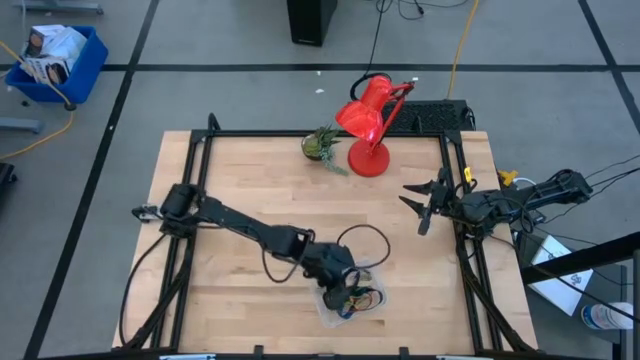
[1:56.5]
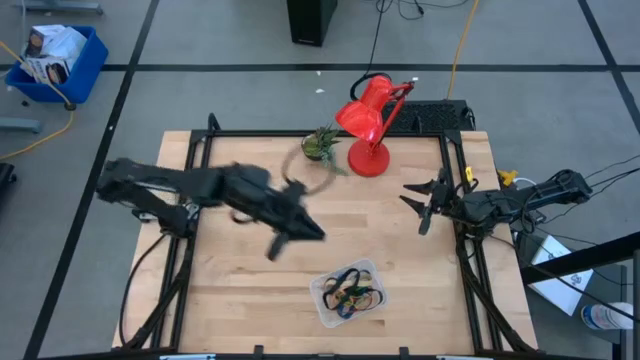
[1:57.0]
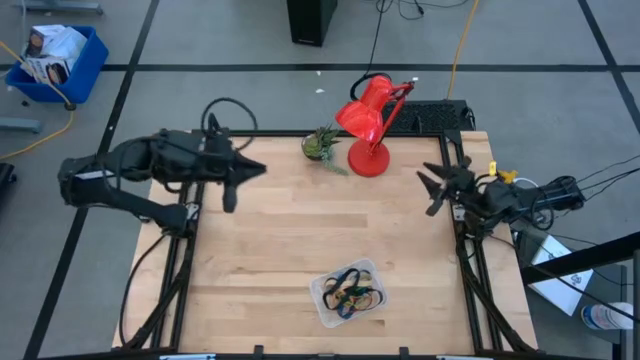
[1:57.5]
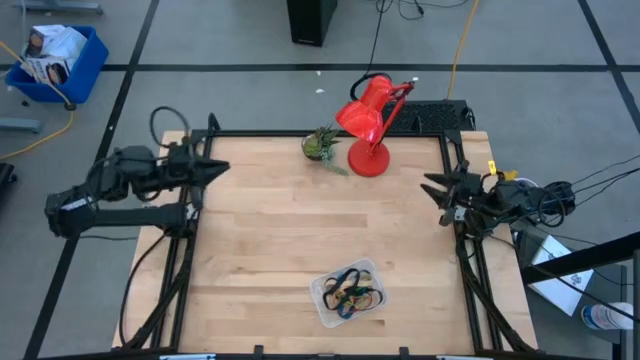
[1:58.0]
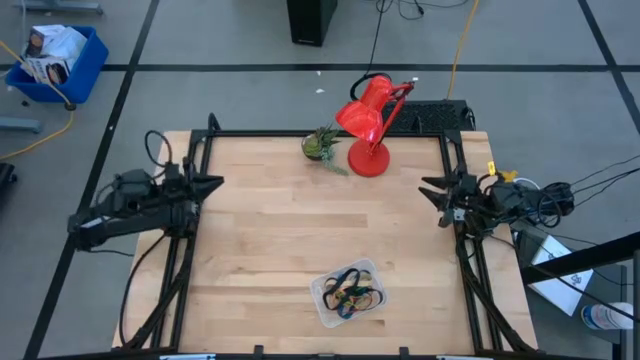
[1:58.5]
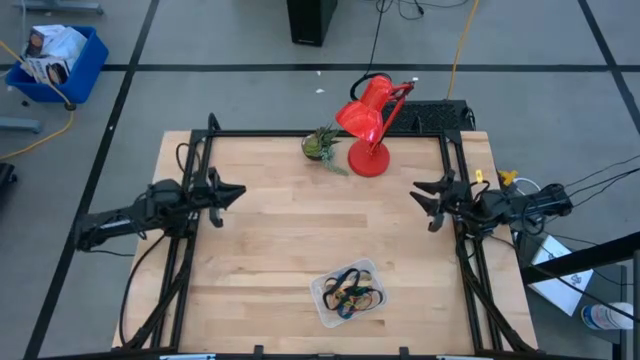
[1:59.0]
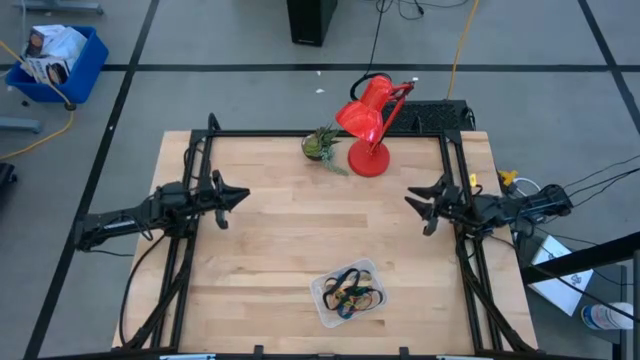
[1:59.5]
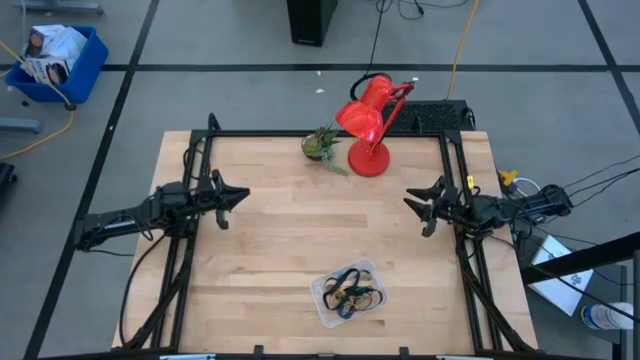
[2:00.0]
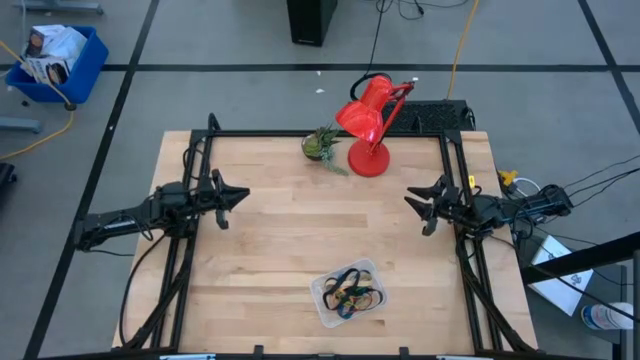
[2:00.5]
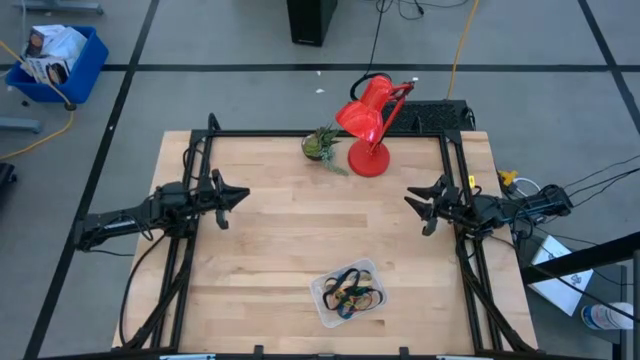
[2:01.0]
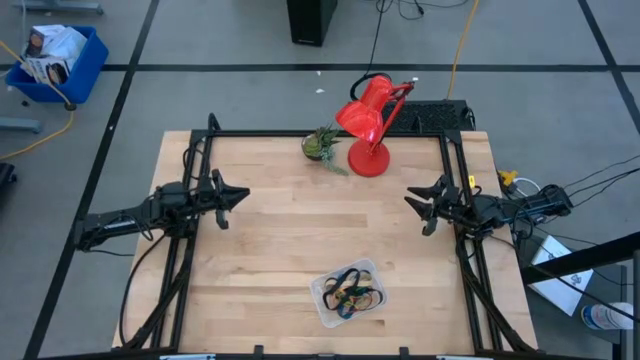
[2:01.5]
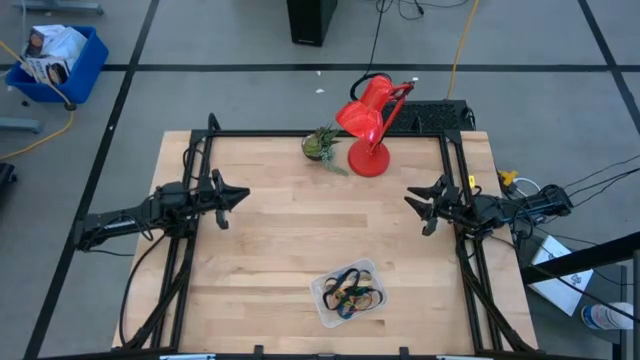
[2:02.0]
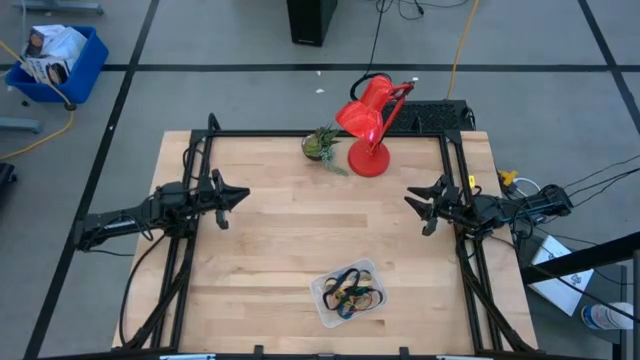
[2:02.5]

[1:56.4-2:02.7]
Task: Pick and place rubber bands into bin
Return to Home Position

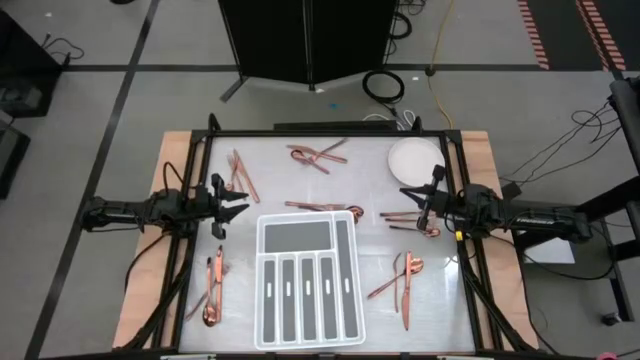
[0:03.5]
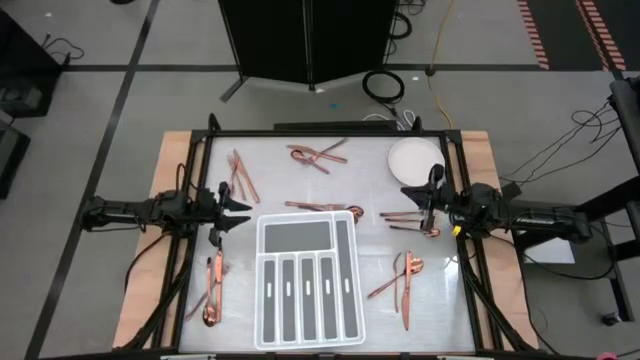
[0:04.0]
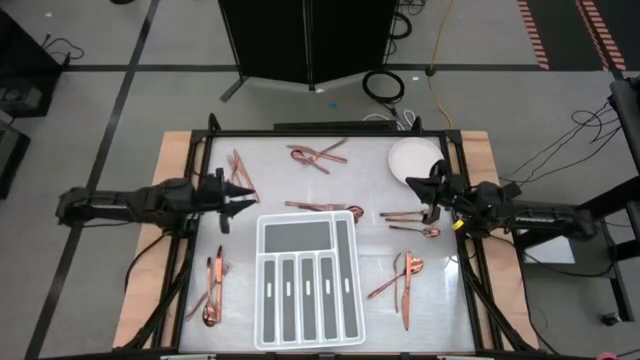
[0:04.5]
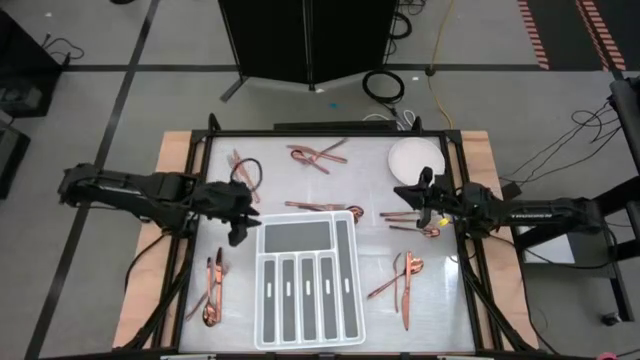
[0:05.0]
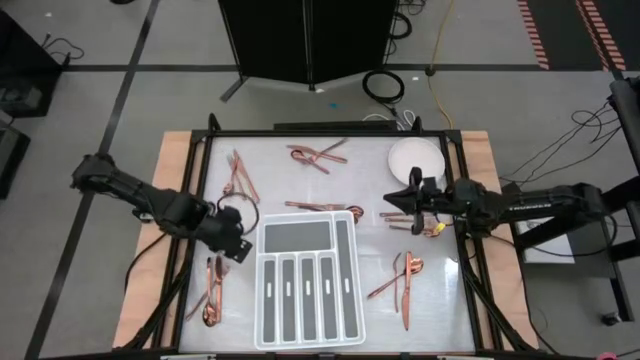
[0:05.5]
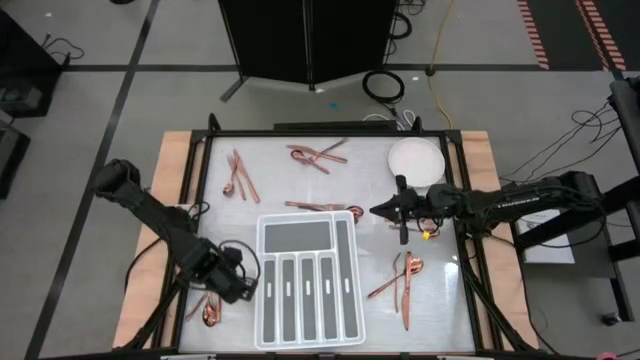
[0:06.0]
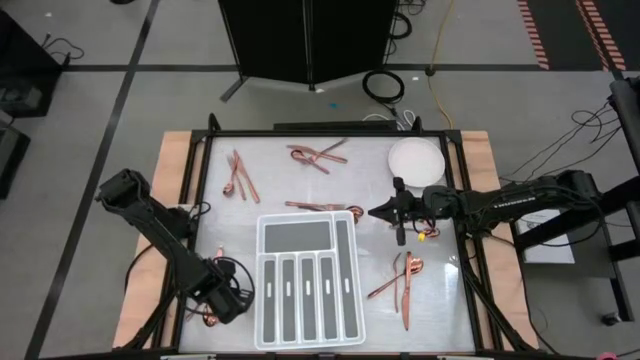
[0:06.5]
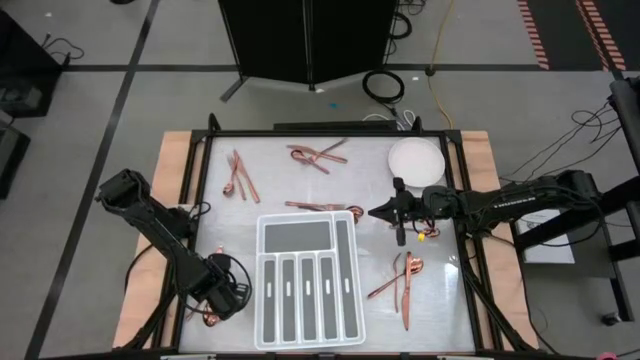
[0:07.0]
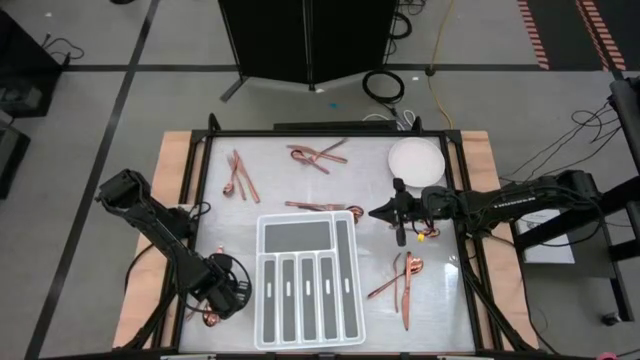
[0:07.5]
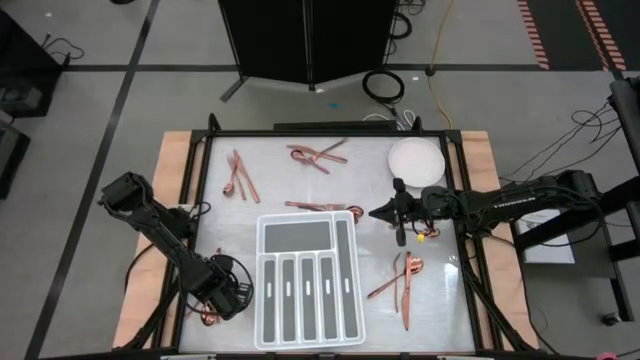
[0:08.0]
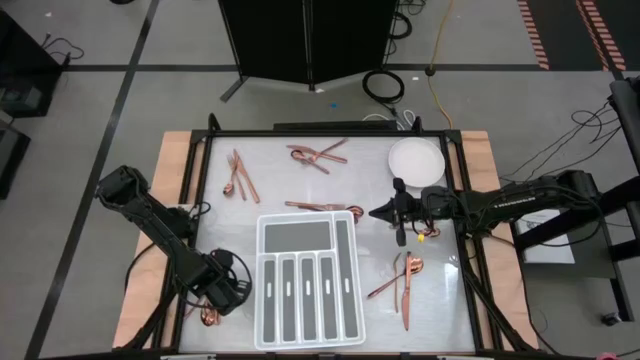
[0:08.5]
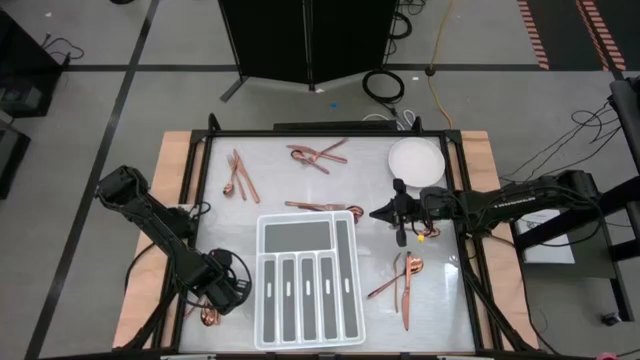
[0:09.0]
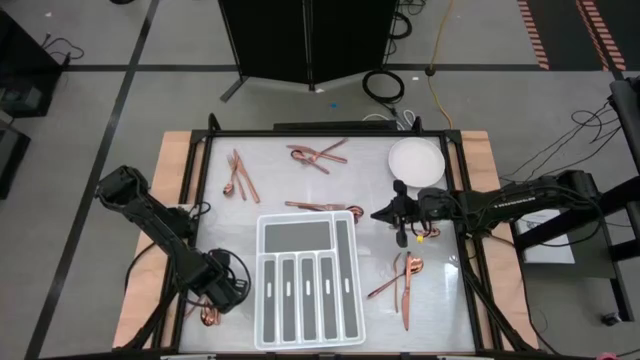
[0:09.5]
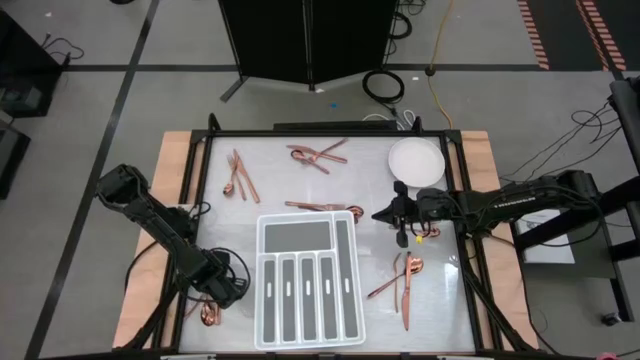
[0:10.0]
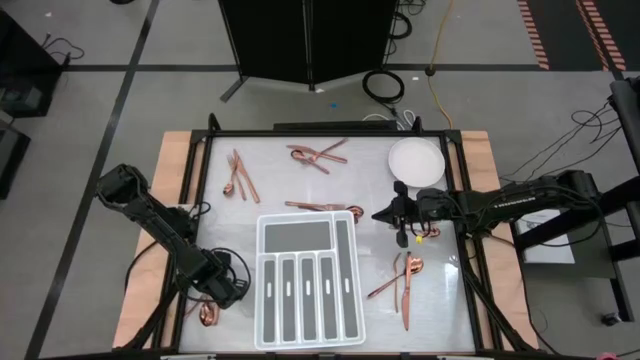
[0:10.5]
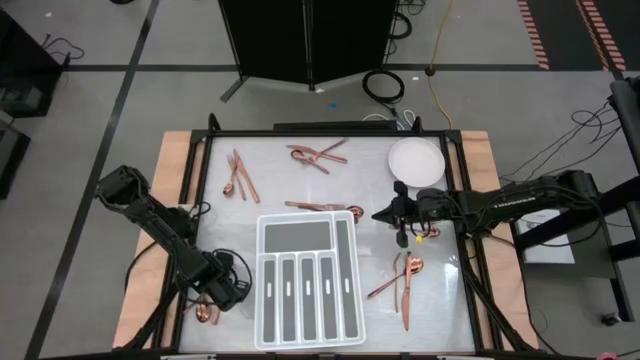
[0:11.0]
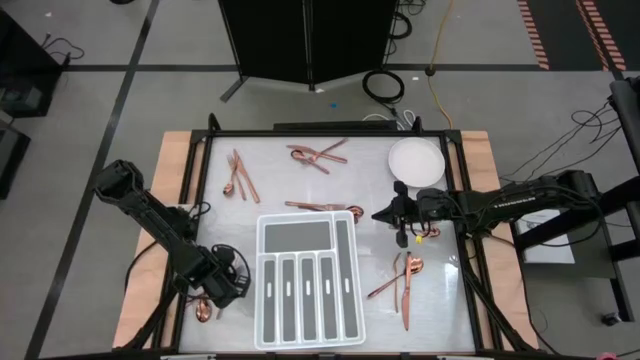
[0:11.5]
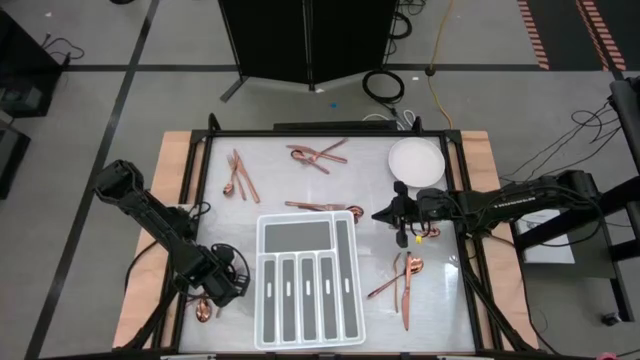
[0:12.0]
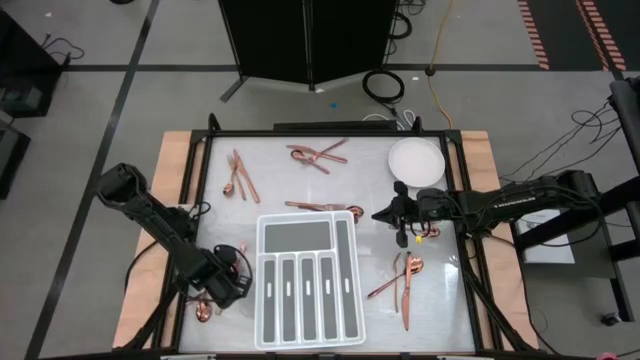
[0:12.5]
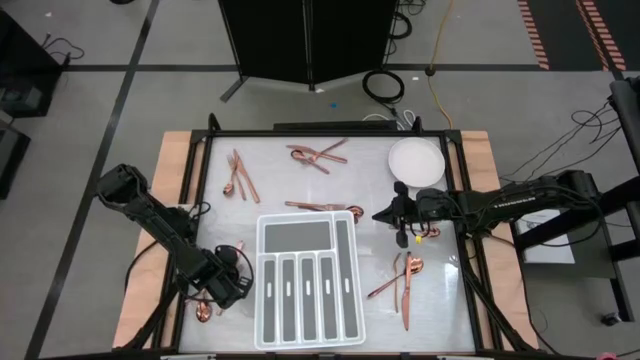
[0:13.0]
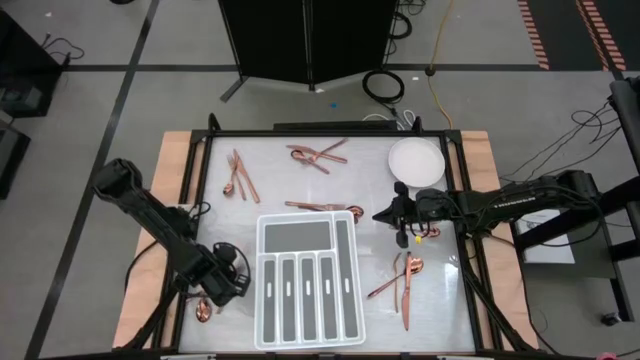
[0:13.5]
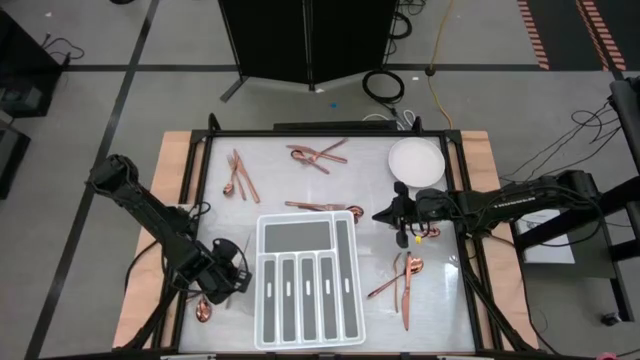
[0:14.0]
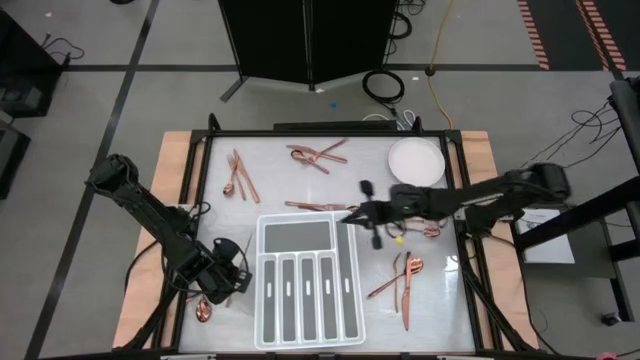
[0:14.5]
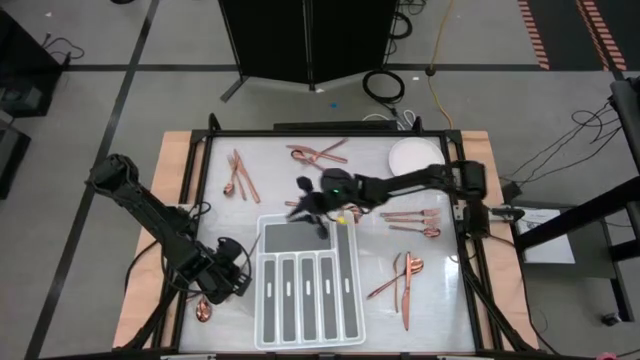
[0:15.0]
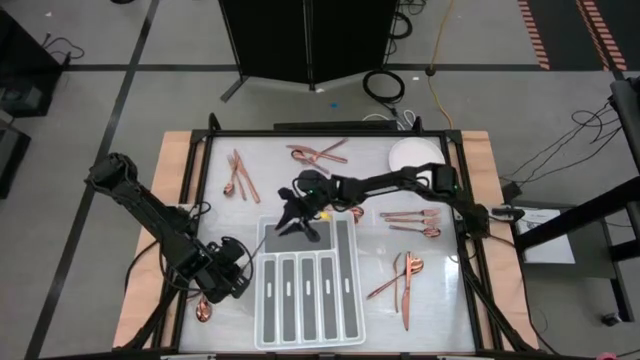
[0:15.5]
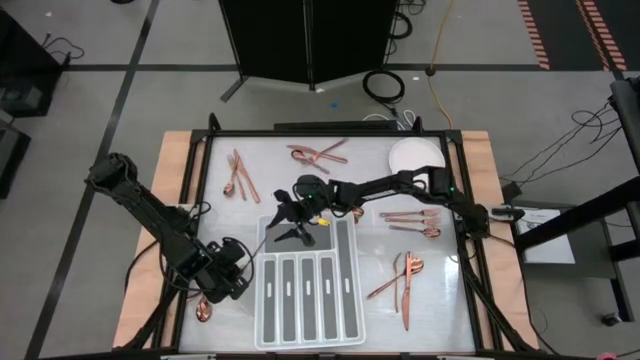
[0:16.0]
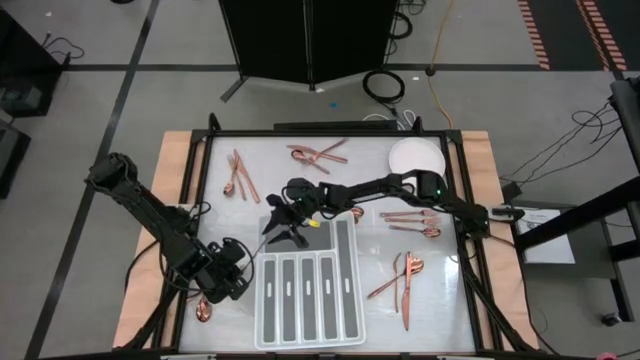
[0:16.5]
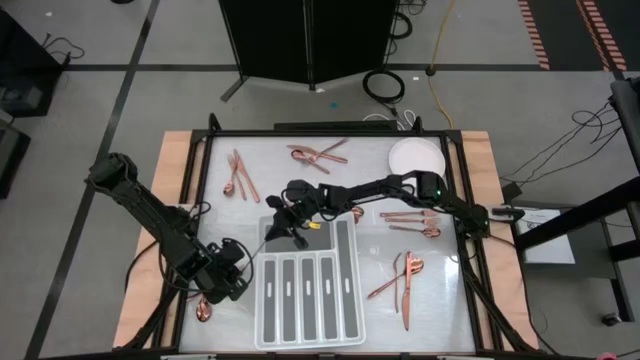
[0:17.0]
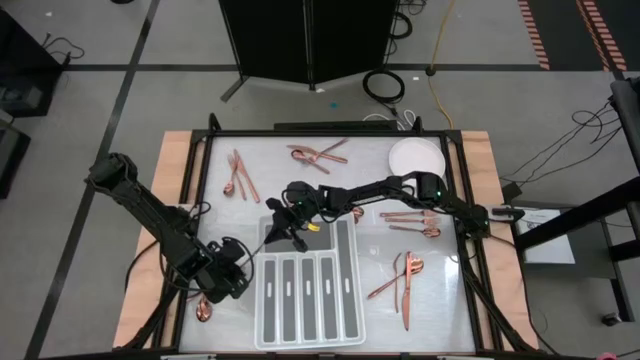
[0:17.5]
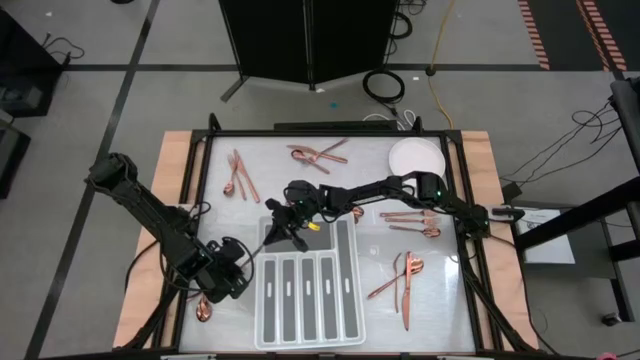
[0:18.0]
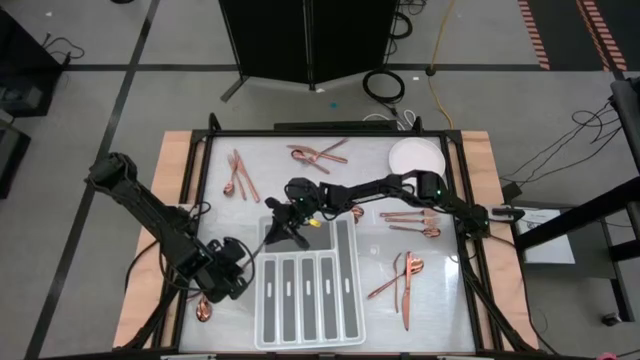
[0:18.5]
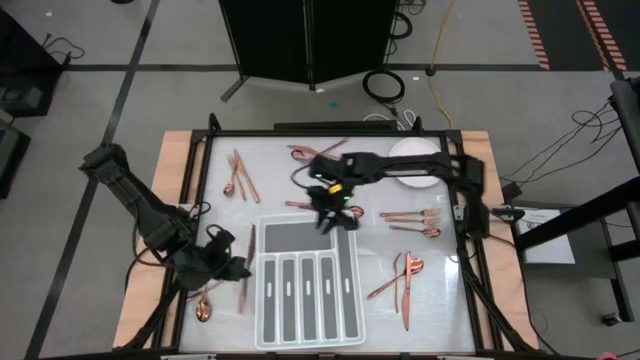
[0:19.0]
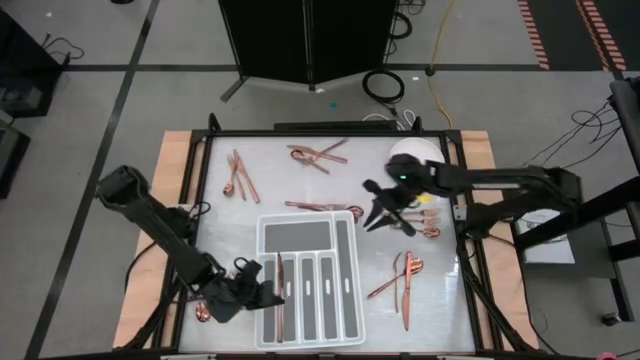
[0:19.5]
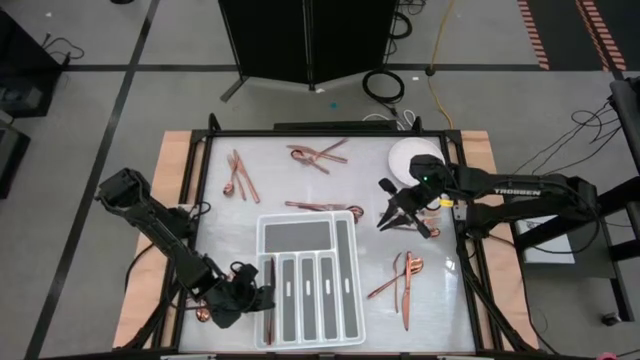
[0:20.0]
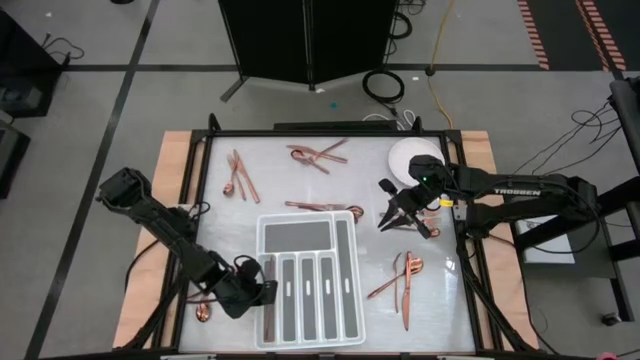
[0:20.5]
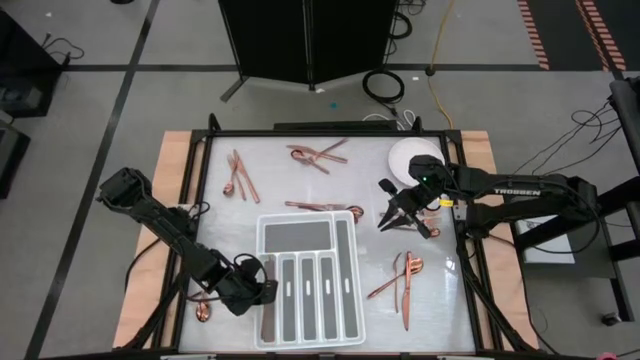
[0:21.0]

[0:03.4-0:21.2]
Task: Sort silverware
Put the knife into the silverware tray
